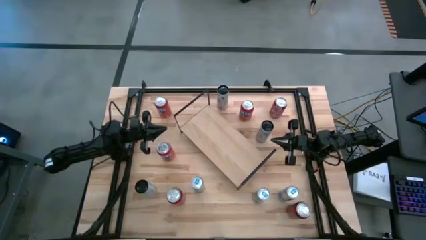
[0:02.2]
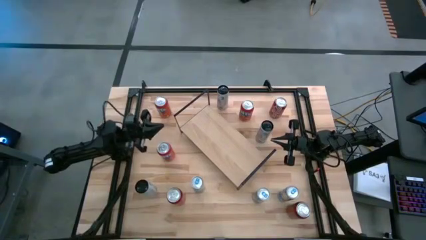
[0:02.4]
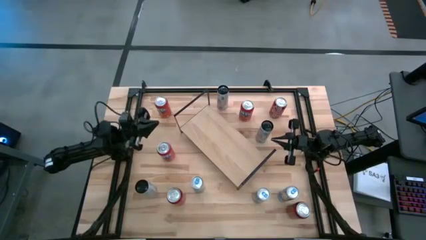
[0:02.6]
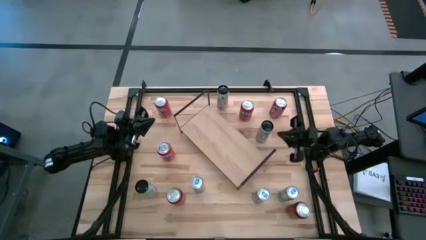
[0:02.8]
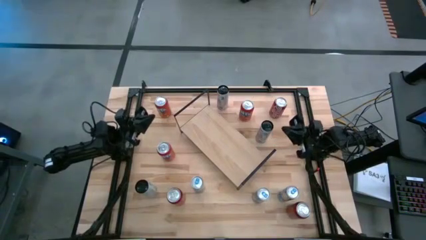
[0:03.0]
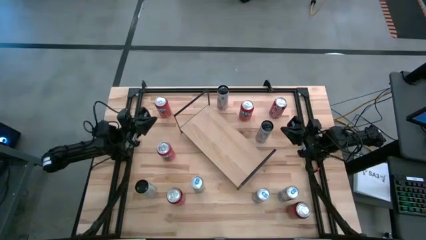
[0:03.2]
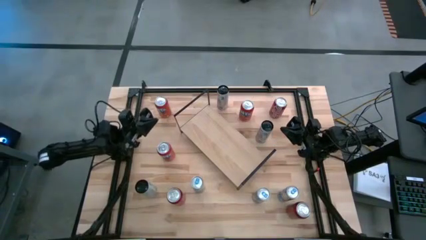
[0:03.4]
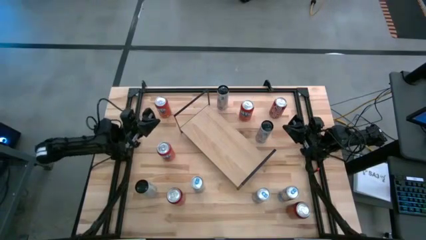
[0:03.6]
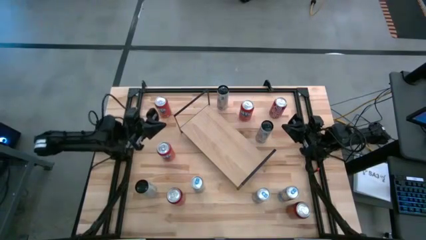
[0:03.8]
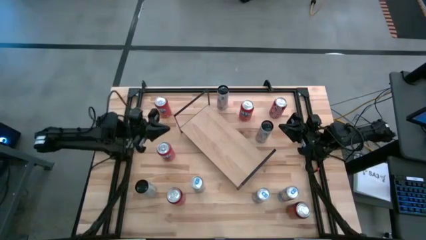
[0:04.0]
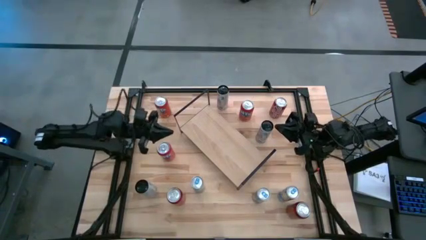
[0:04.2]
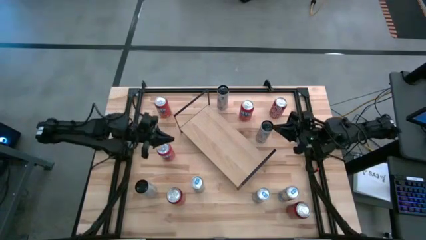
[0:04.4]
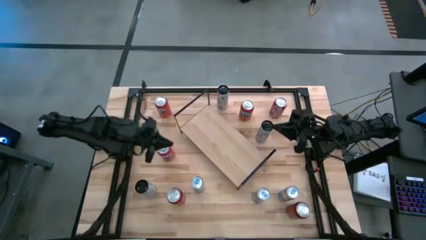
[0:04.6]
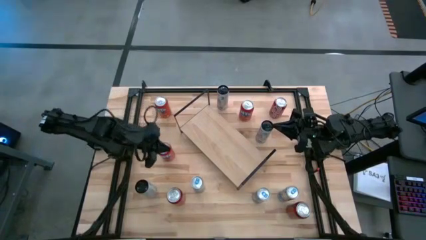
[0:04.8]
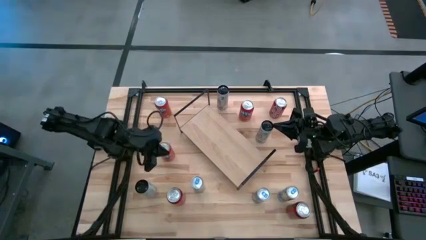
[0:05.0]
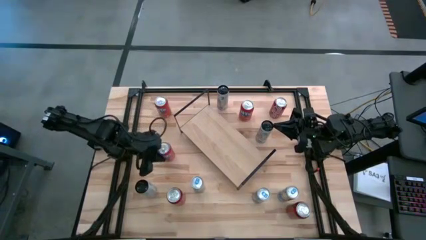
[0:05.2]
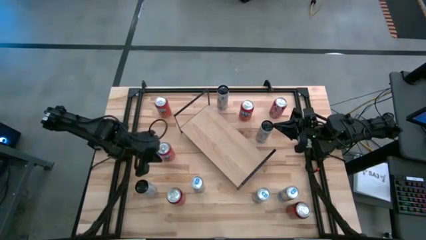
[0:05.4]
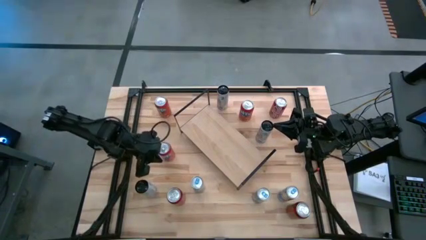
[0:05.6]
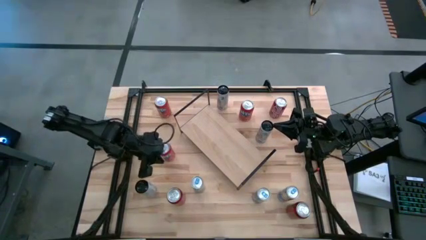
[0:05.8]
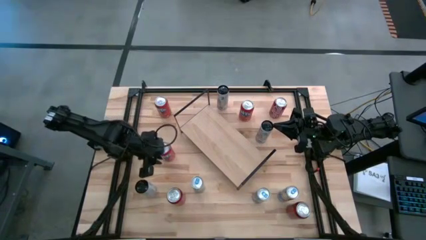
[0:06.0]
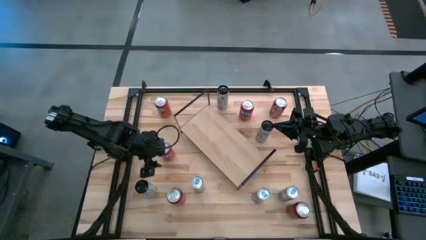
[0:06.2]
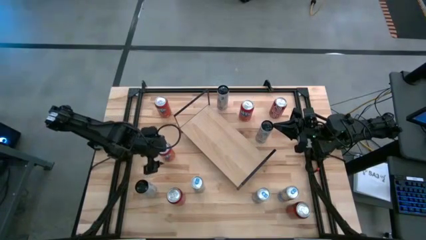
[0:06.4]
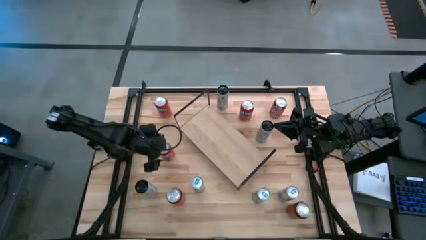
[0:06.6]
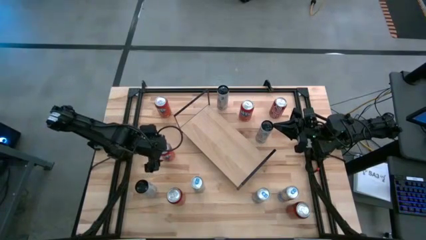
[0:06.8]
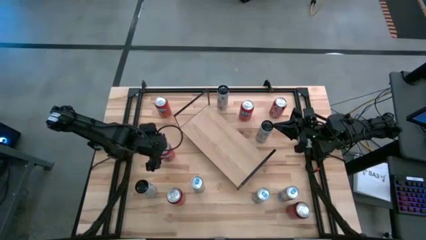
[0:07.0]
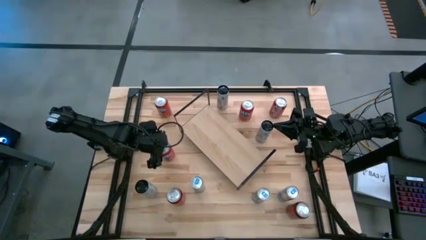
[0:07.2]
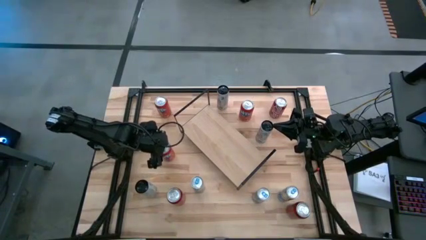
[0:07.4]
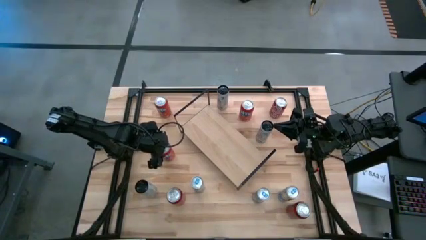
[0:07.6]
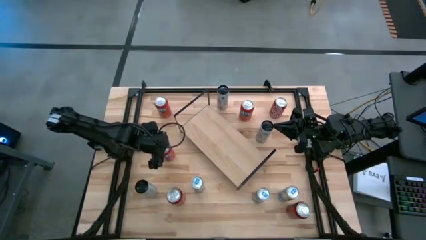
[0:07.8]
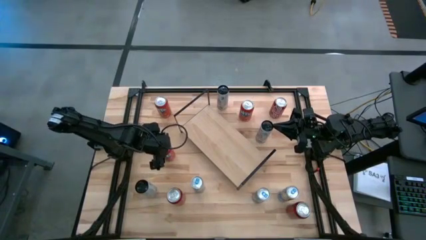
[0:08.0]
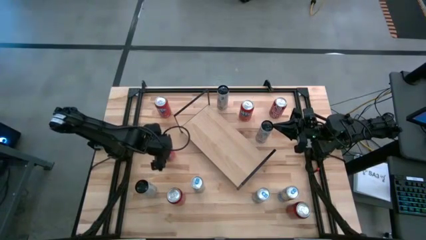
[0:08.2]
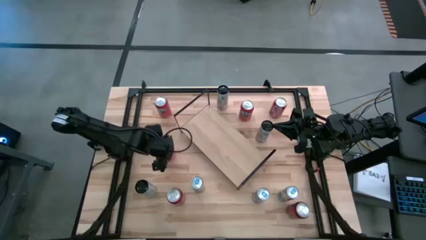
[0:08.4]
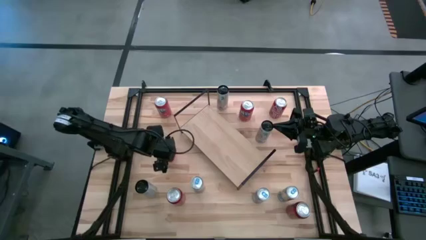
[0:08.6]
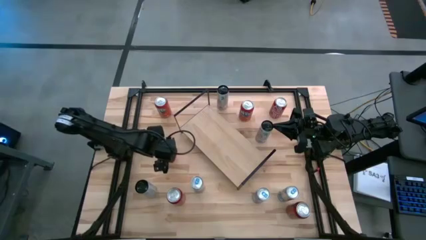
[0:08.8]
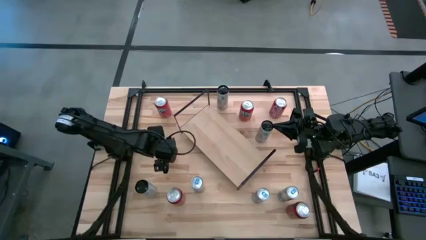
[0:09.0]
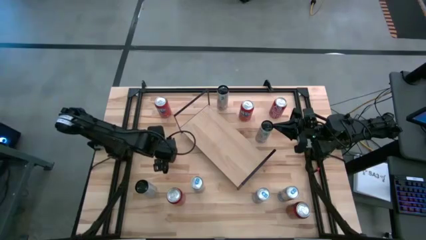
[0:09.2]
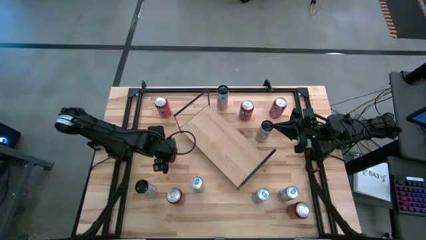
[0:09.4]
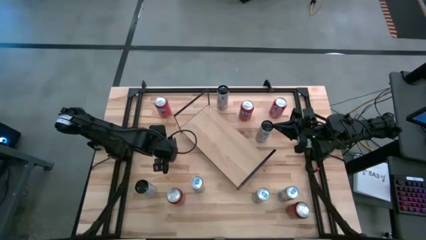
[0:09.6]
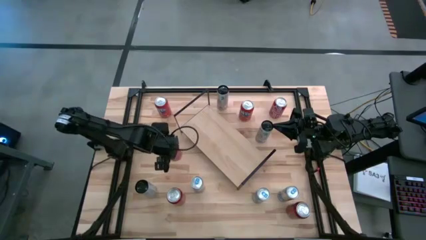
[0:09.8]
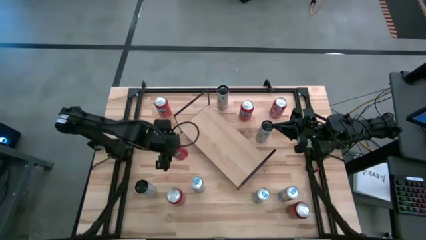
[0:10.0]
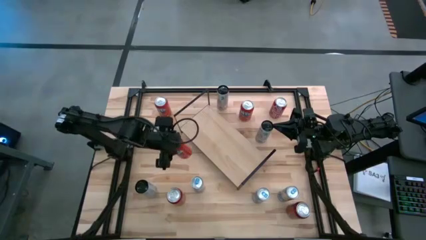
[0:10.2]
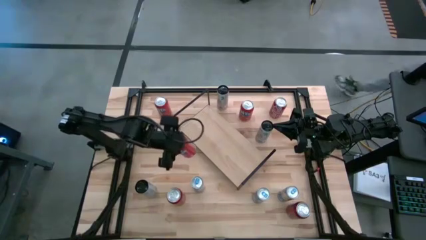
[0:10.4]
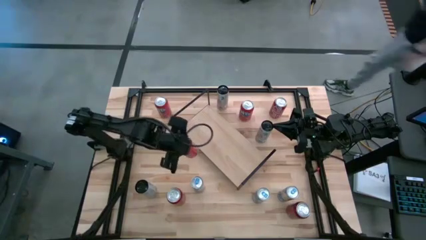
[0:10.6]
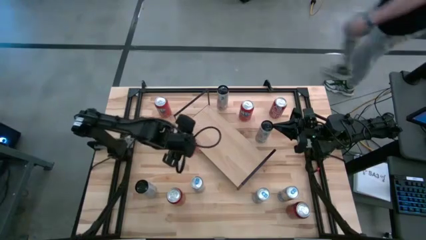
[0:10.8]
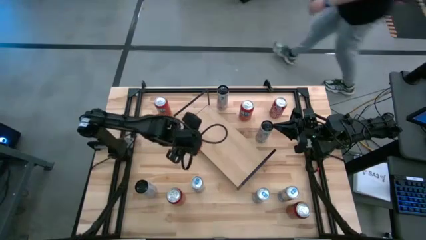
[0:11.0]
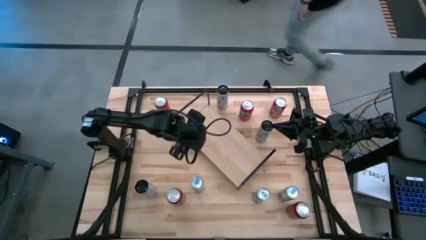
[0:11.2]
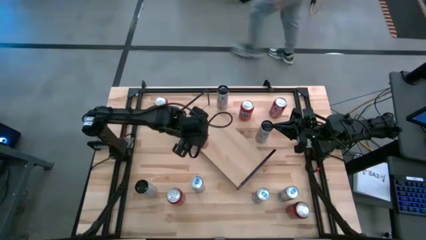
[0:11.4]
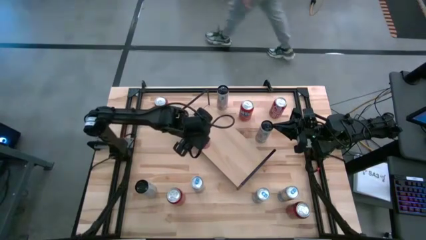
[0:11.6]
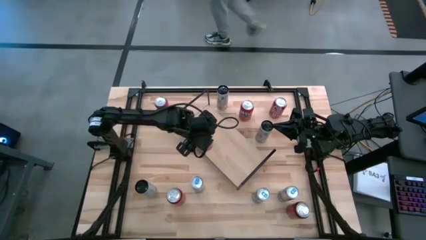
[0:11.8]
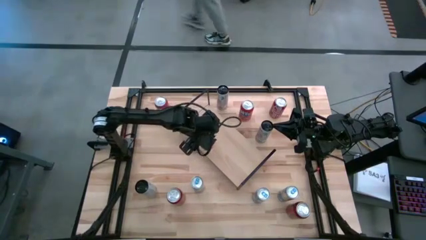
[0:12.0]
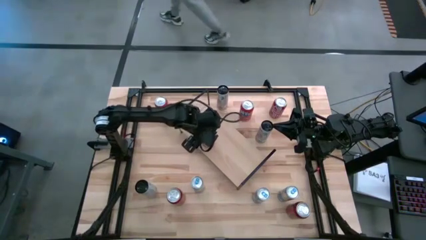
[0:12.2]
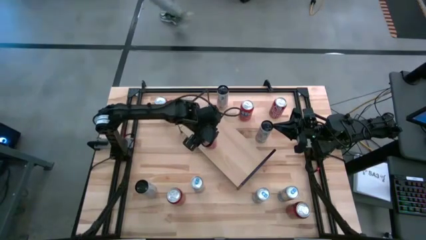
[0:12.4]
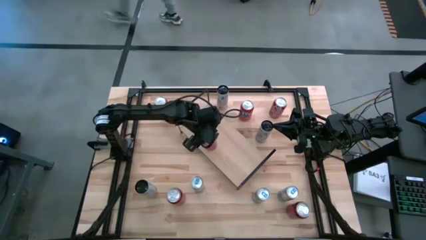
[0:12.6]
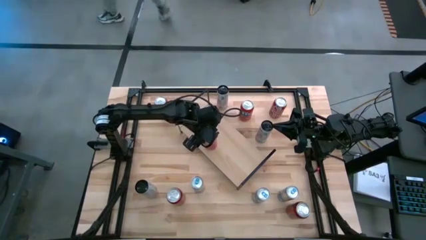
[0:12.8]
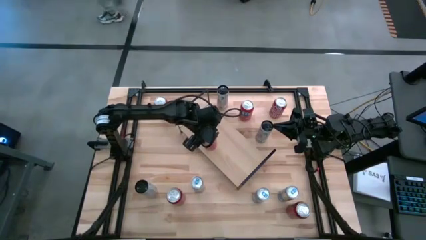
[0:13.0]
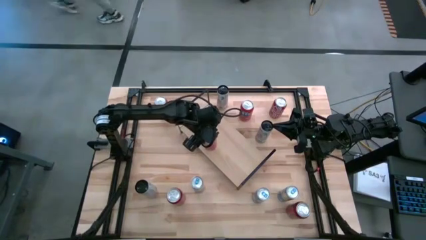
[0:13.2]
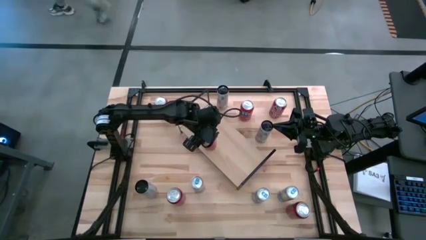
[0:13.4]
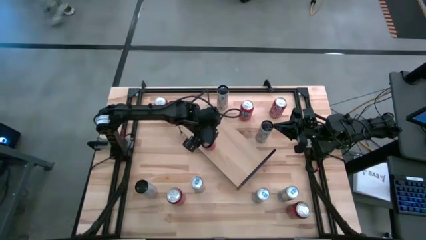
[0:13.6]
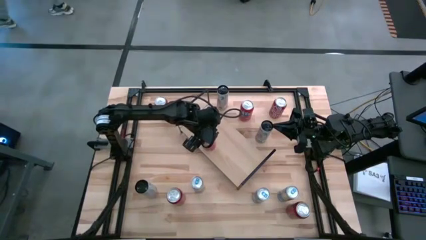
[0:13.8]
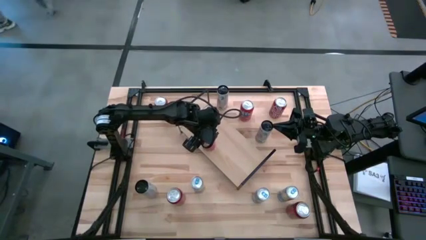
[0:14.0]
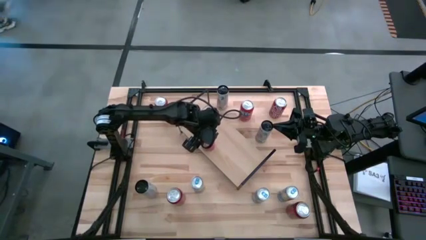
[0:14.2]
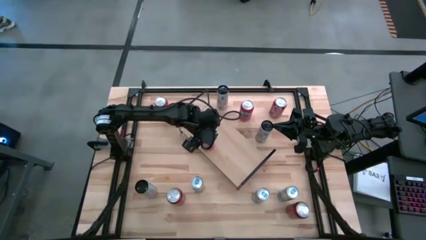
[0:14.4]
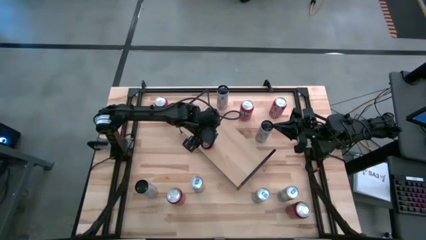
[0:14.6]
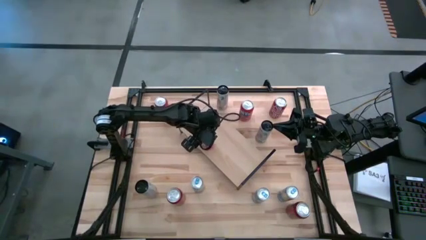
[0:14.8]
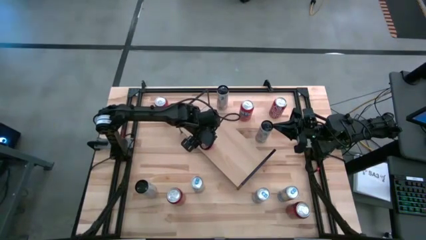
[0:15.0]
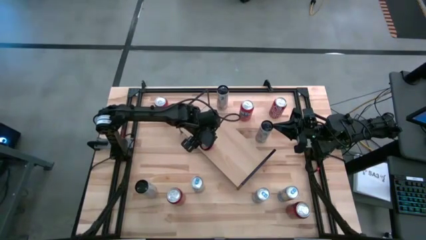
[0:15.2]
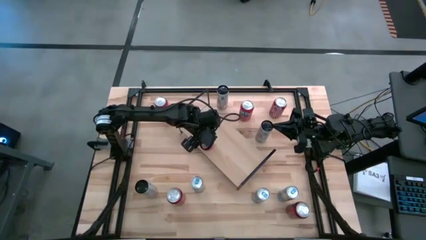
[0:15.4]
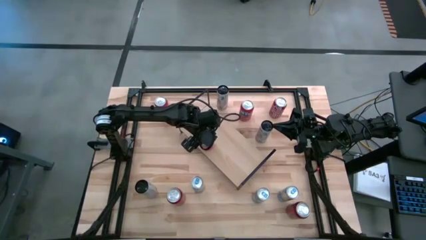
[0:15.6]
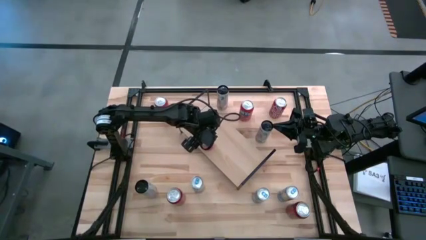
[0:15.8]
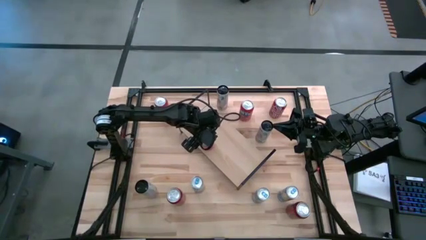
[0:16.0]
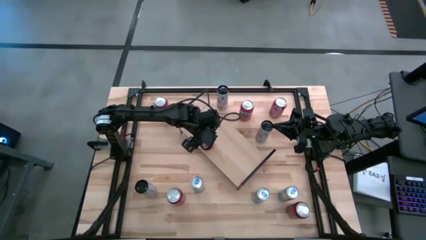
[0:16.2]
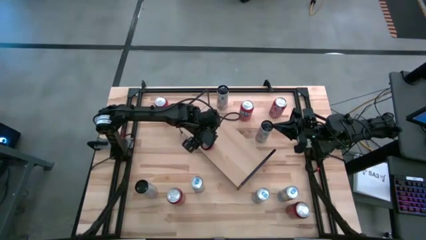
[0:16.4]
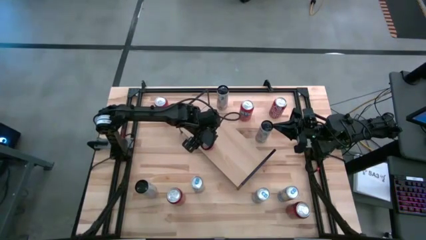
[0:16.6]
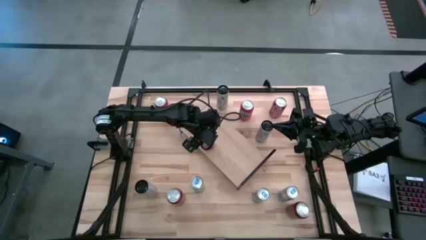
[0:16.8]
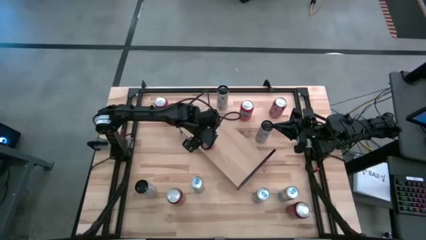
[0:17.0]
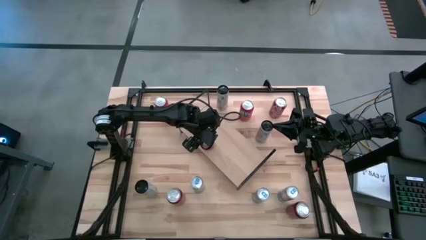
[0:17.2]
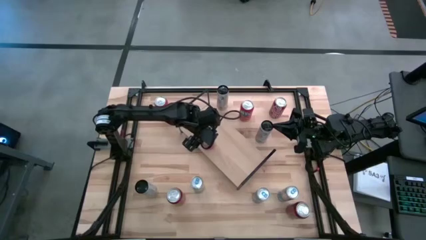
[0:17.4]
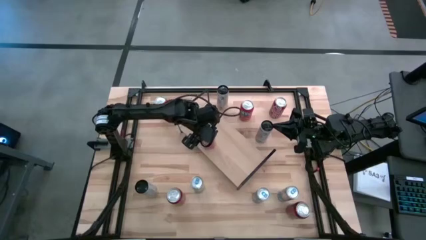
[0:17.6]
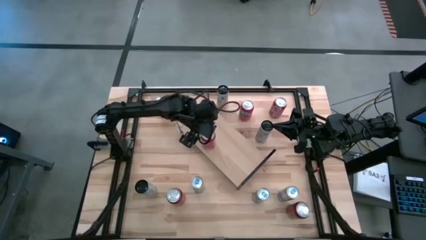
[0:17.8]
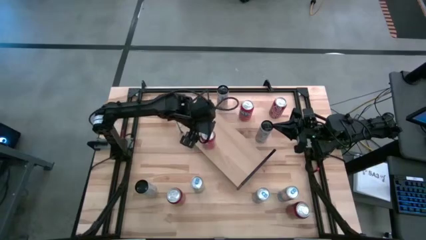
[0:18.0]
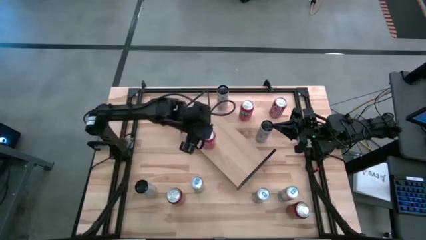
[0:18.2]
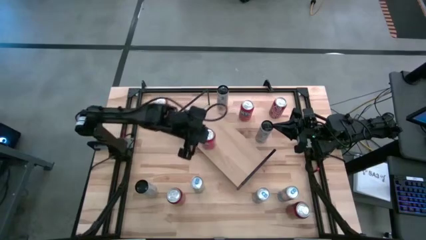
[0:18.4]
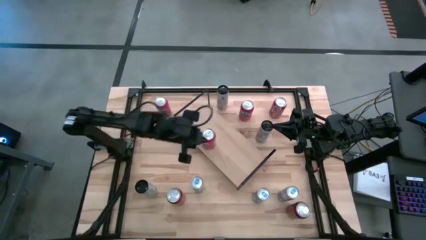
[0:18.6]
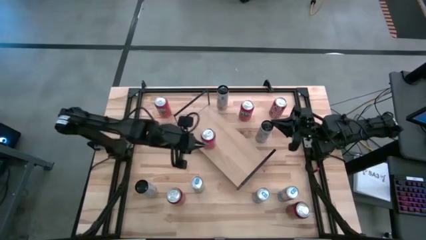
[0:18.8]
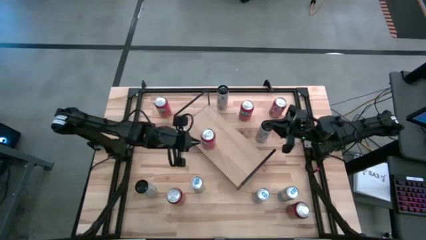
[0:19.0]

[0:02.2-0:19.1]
Task: Place canned beverage on shelf
Put the bottom orange soda can on the shelf
